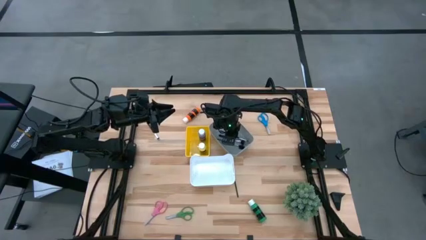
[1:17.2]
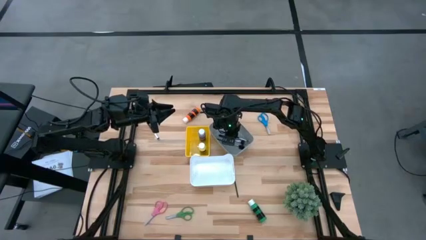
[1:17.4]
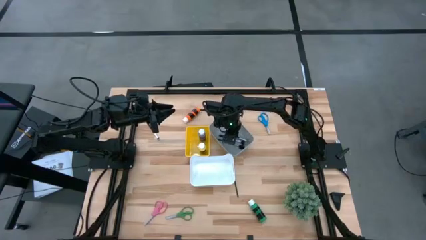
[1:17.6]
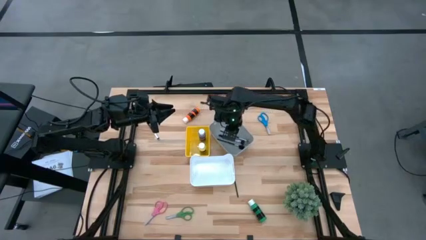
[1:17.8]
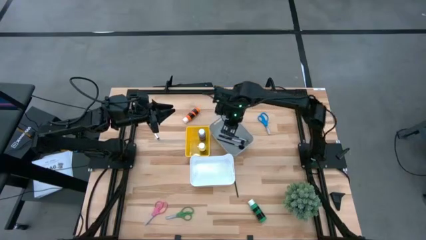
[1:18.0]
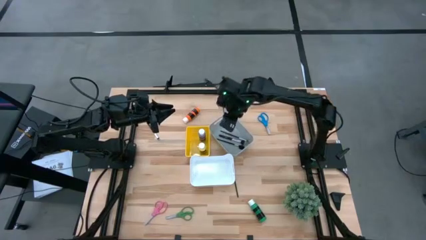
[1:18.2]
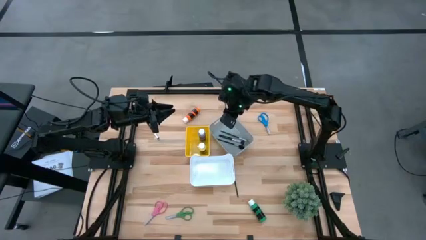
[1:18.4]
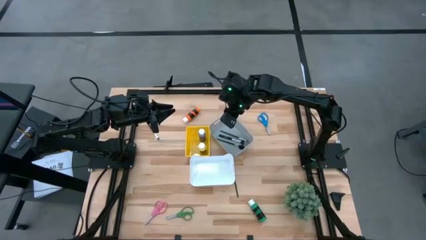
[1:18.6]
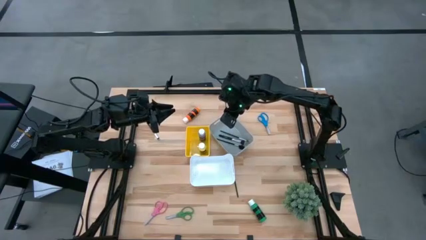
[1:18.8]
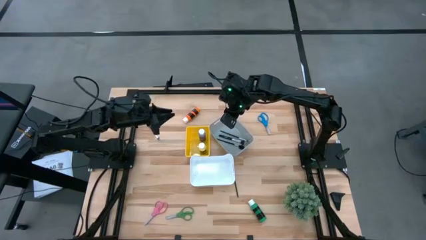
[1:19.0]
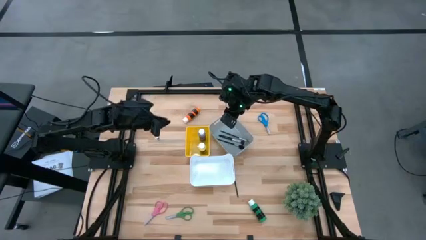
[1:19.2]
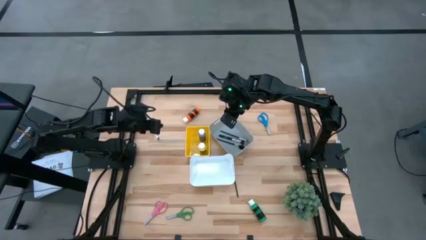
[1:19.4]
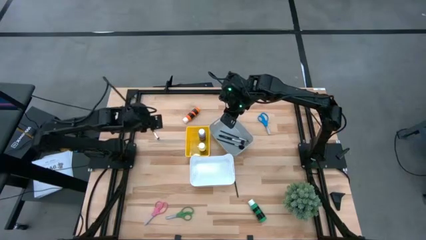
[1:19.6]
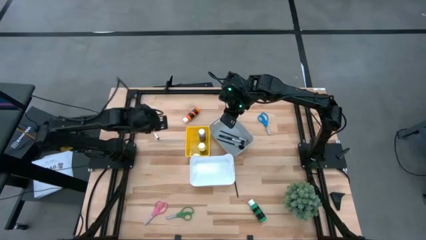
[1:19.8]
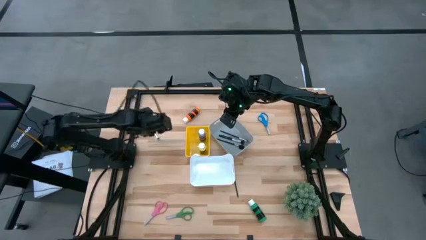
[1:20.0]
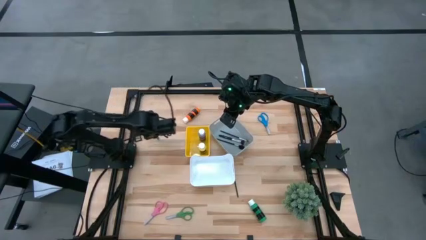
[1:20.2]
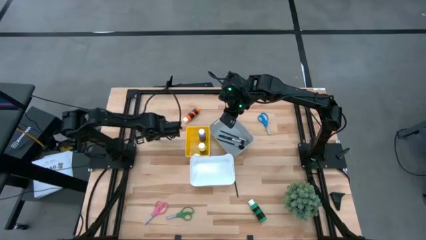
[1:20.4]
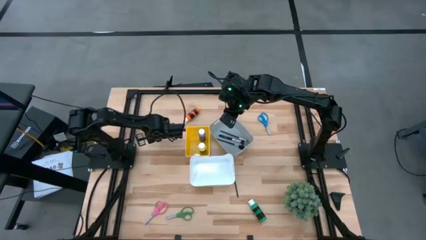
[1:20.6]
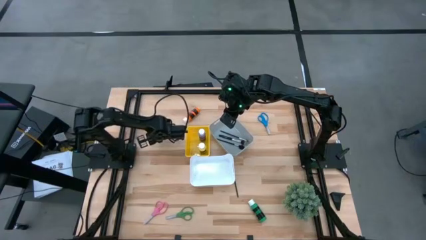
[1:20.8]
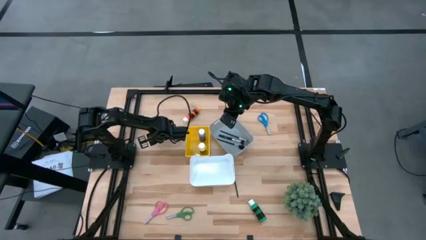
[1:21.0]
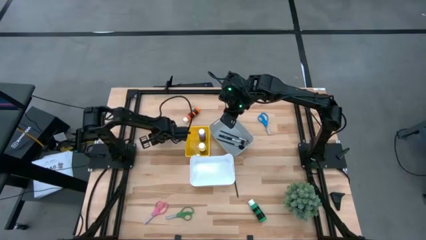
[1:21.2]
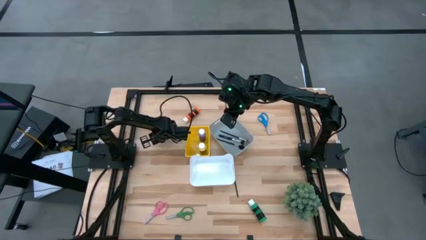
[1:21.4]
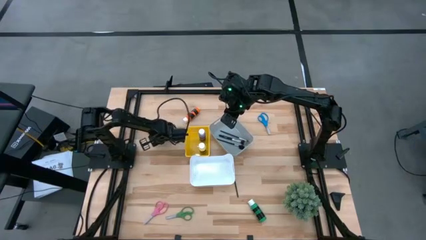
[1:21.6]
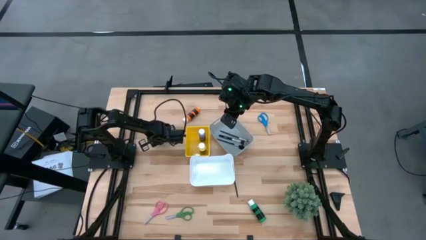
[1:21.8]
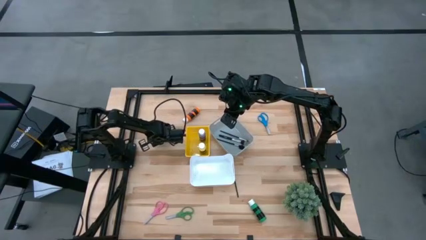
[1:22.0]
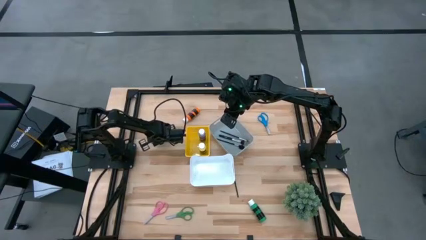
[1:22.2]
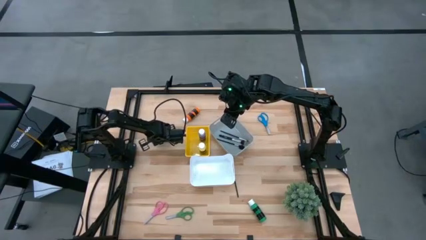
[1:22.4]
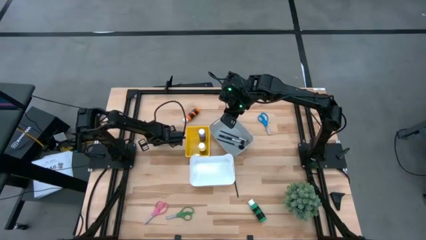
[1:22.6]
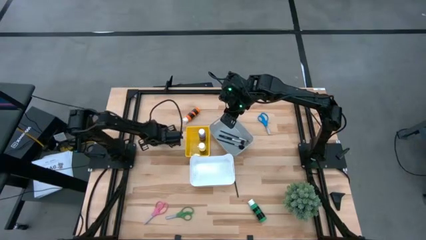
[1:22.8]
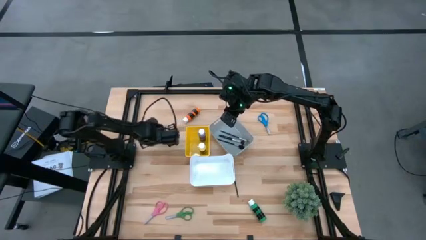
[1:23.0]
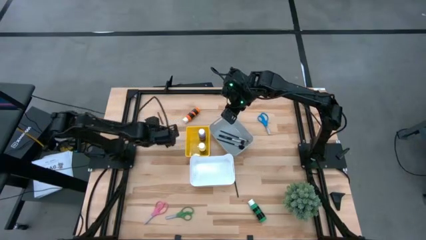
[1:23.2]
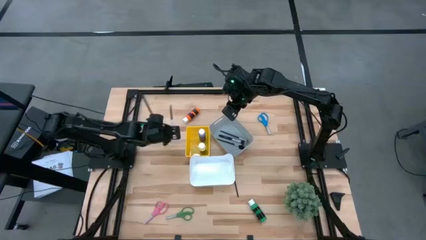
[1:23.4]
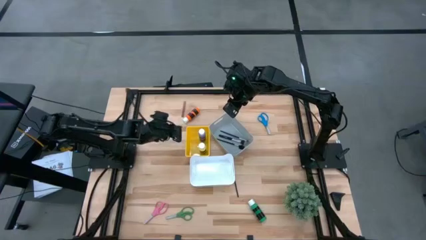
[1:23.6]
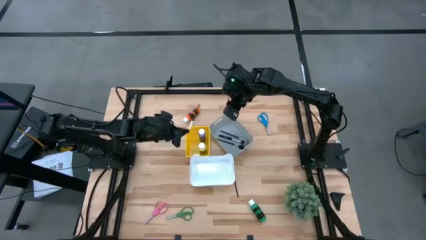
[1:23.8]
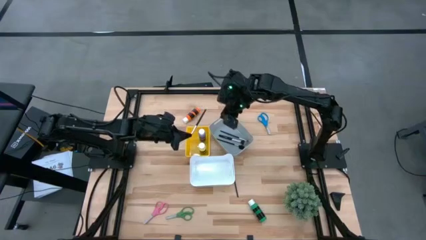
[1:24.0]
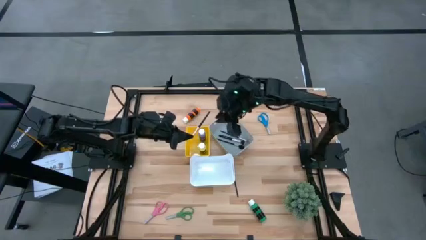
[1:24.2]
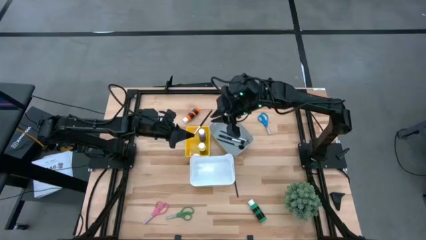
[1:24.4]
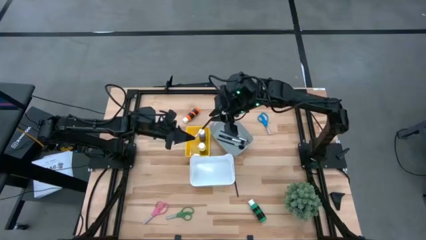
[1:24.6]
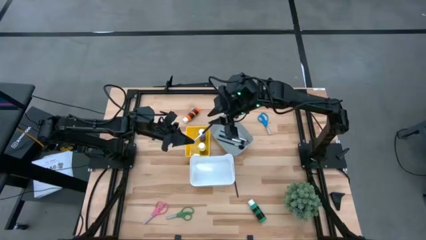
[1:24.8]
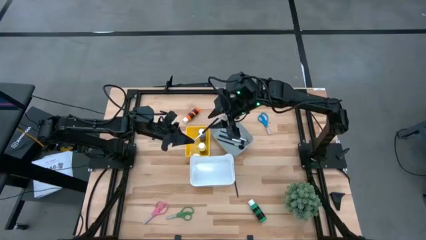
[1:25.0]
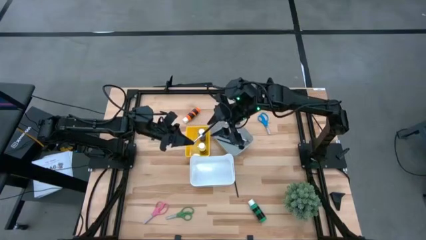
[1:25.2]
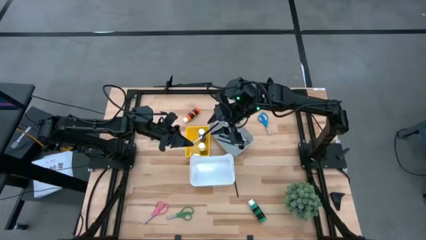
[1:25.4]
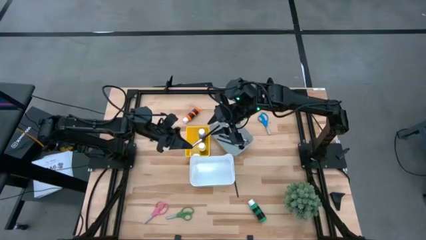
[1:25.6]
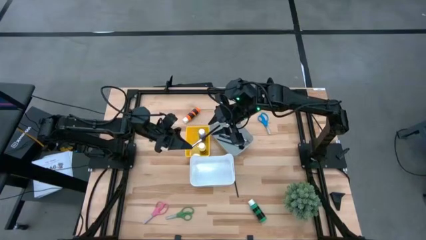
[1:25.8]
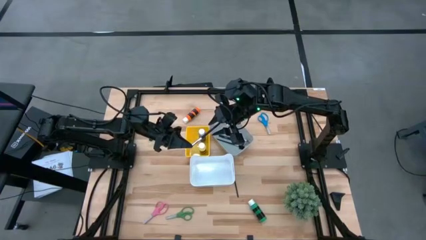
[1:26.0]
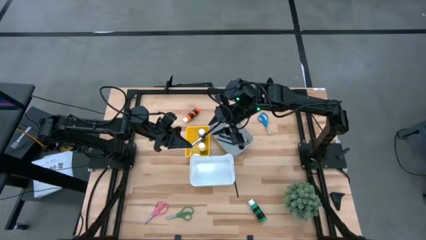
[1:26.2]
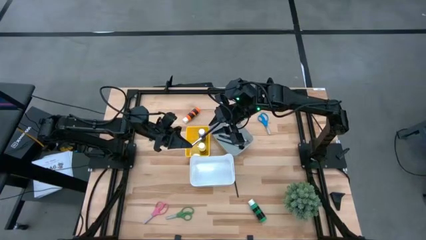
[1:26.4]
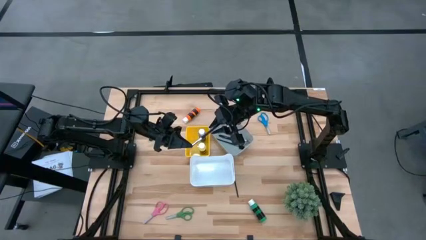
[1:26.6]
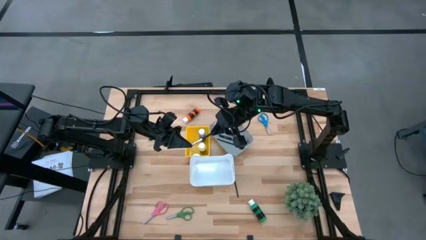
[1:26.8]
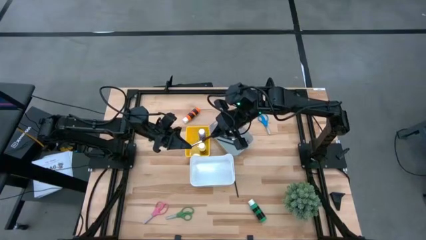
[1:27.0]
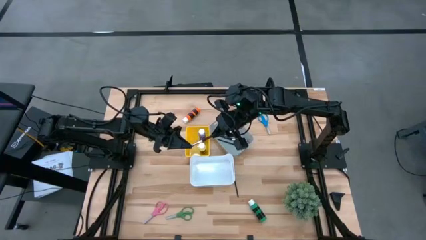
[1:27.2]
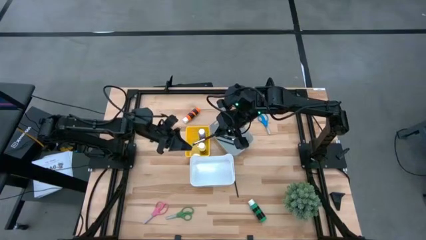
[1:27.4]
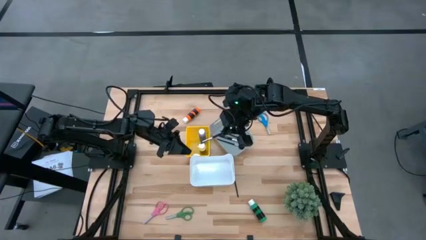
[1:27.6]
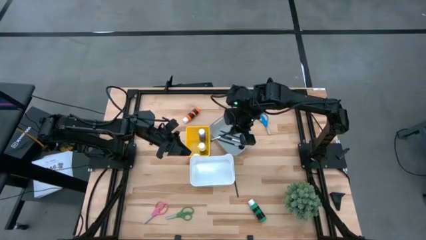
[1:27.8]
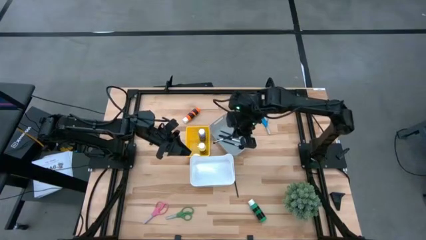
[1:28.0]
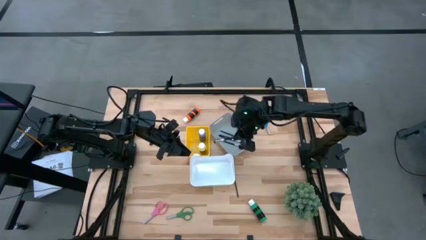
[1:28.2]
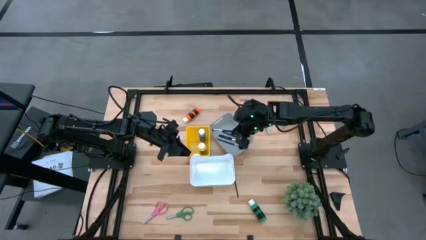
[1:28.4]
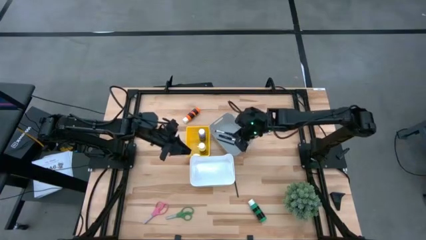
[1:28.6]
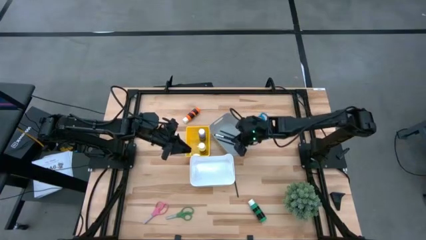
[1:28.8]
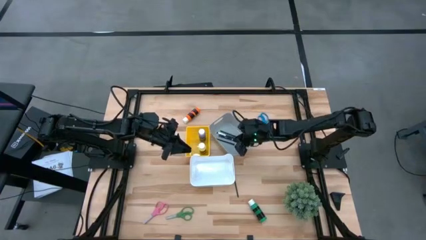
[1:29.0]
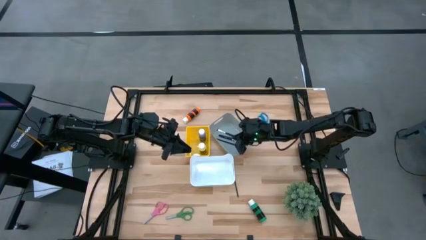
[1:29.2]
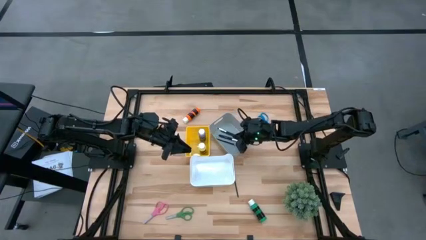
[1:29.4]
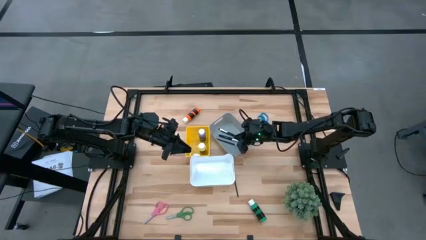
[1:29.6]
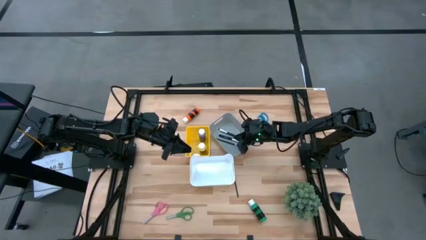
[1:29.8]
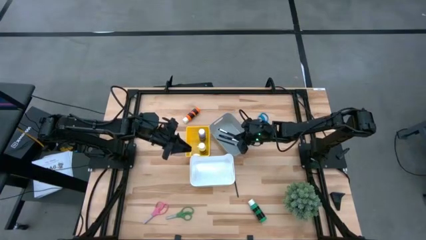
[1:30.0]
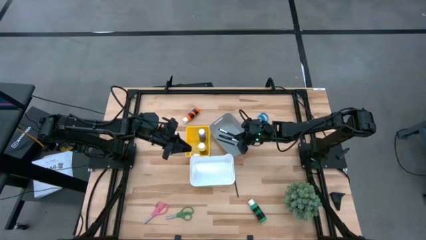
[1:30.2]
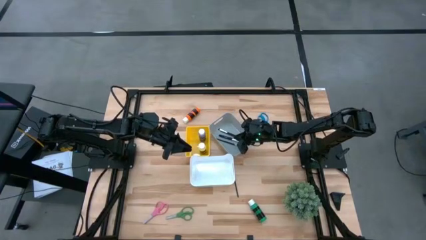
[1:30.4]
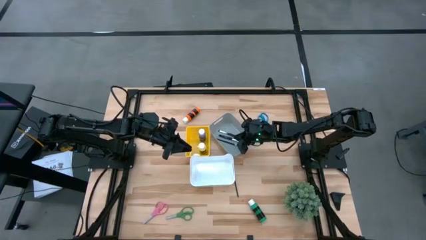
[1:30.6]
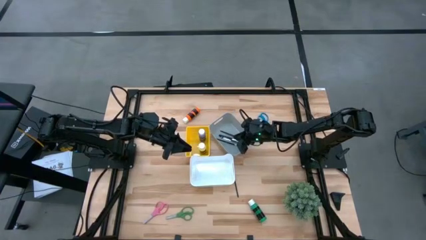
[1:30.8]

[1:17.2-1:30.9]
Task: Pick & Place Paint Supplies
Put the foundation brush into the gray bin

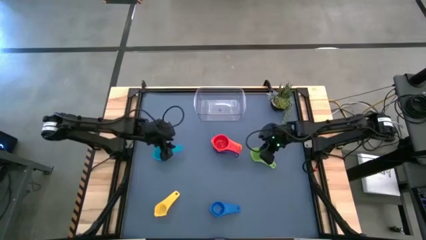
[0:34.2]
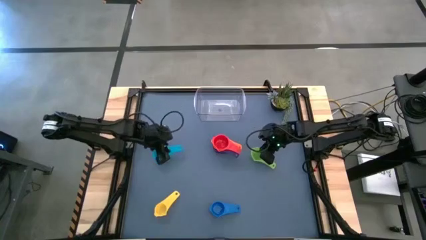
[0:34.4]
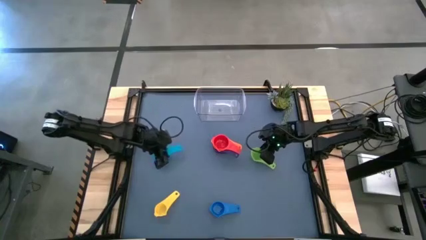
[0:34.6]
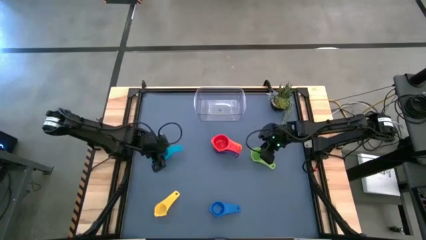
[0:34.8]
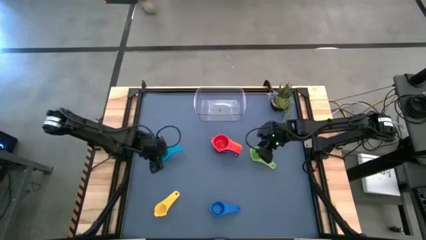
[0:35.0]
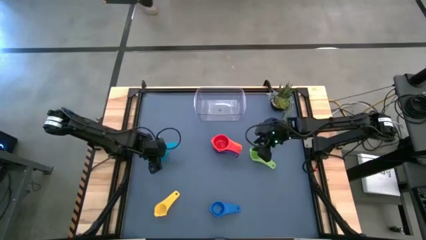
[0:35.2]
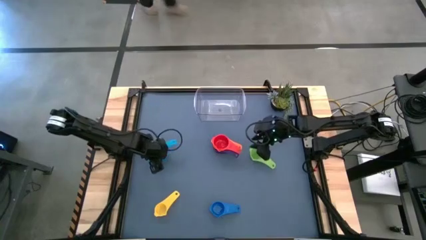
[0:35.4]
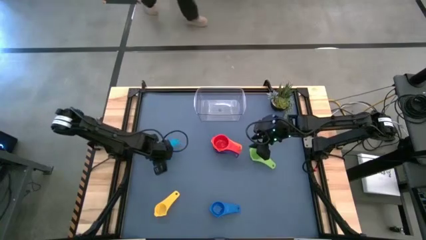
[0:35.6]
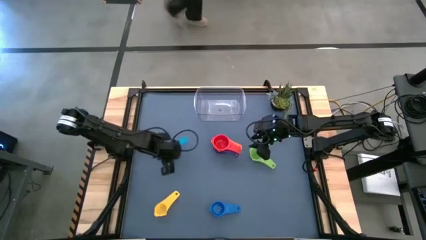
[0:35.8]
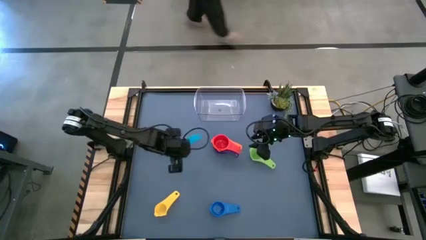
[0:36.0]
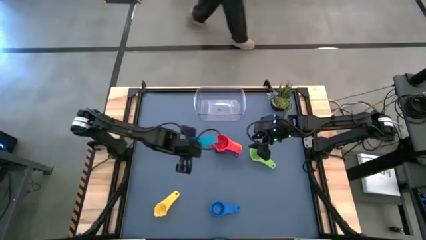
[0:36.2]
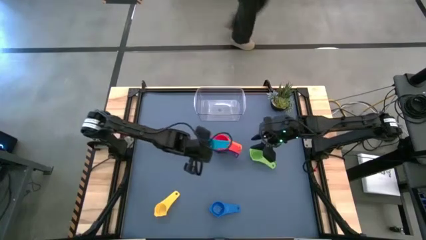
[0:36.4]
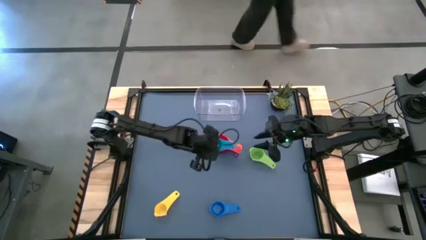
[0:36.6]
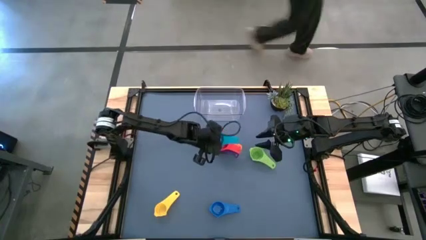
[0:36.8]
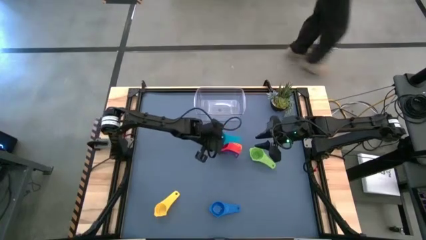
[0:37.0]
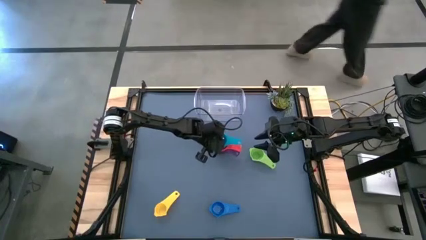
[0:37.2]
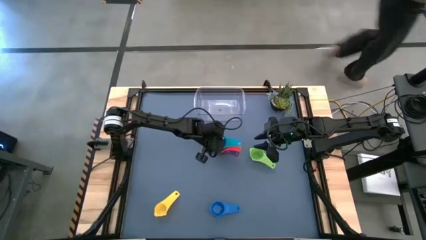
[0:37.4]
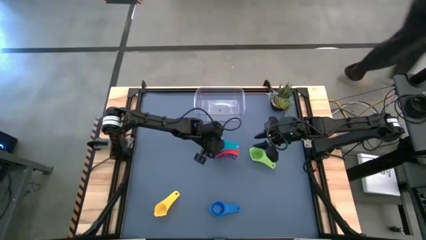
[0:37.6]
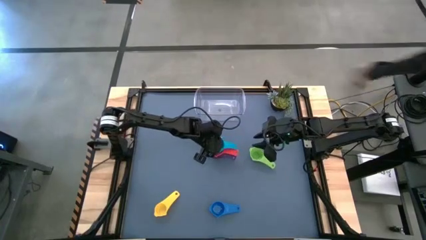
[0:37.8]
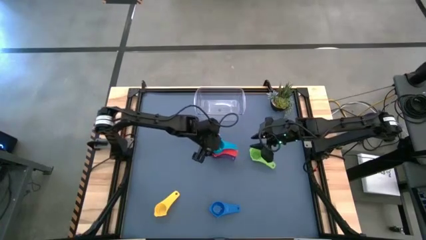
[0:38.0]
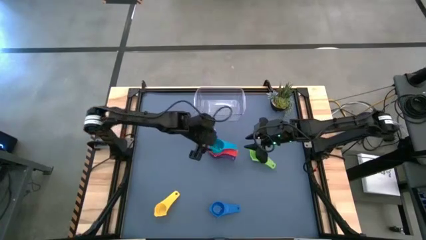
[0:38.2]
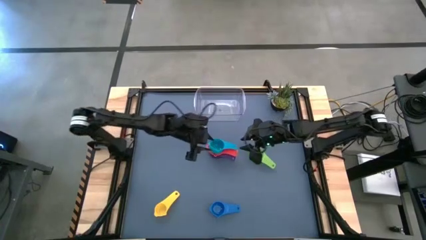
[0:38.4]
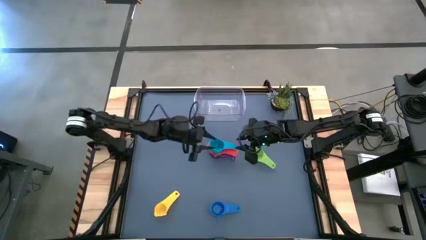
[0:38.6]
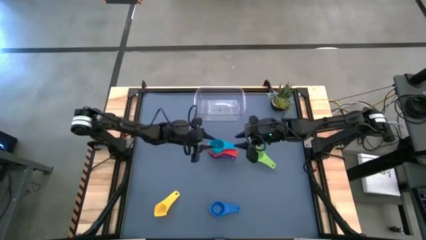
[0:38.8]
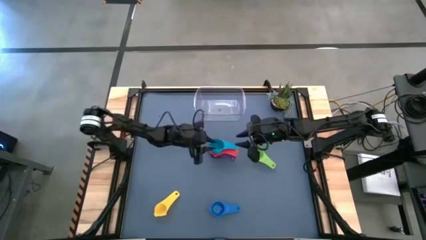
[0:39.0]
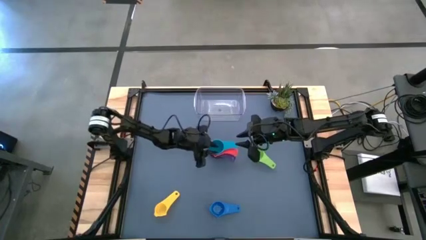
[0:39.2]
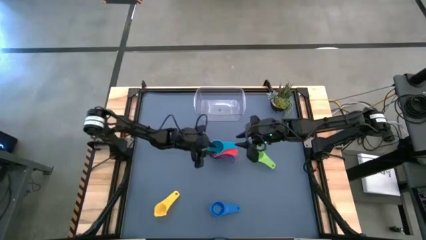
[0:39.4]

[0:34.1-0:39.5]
Task: Nest measuring cups in basket
Stack the blue measuring cup on top of the orange measuring cup
